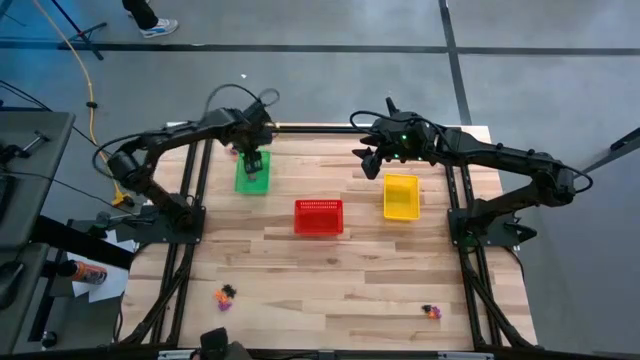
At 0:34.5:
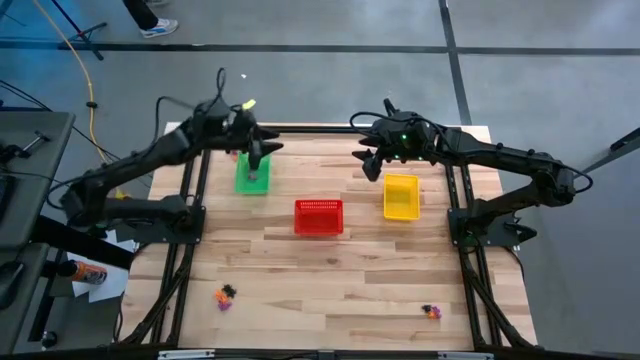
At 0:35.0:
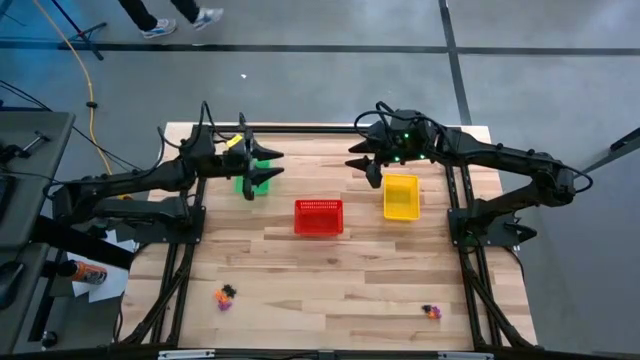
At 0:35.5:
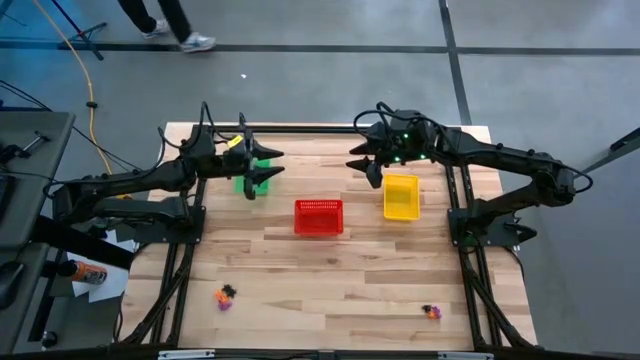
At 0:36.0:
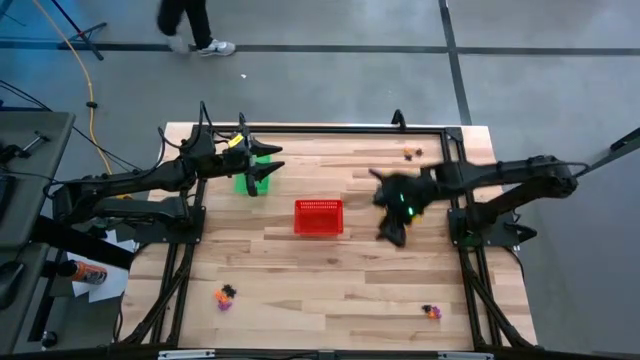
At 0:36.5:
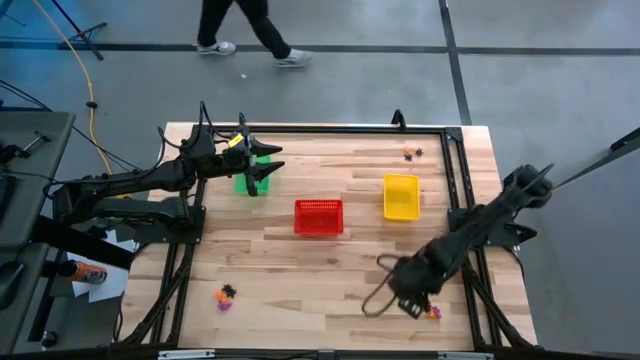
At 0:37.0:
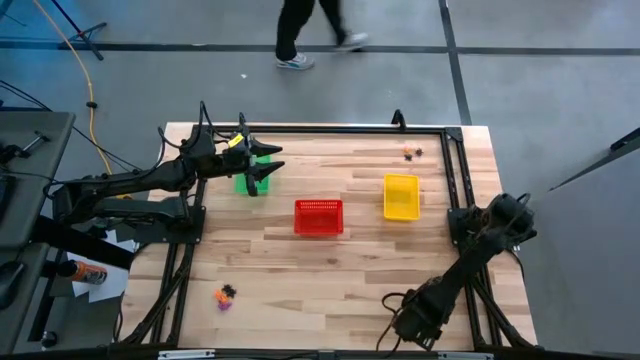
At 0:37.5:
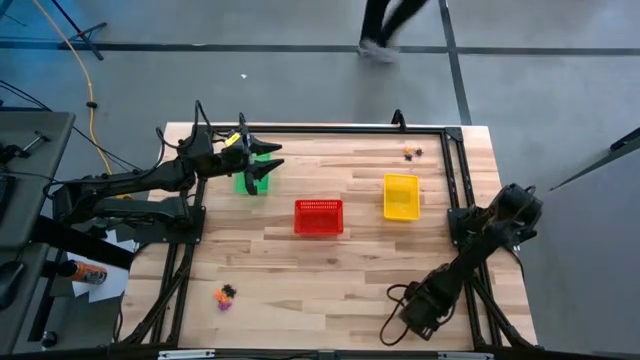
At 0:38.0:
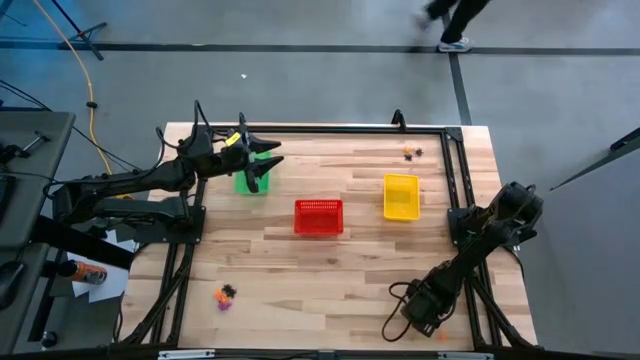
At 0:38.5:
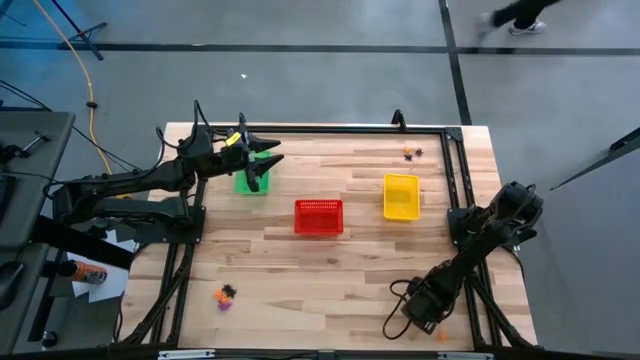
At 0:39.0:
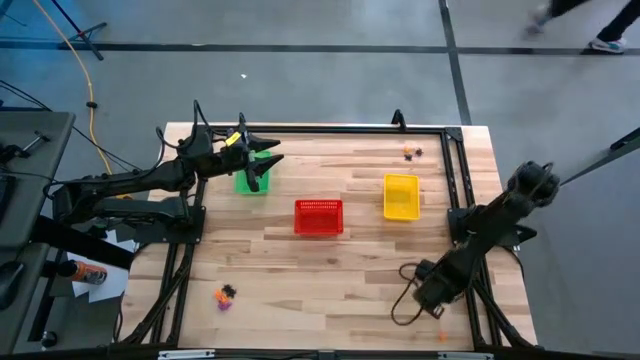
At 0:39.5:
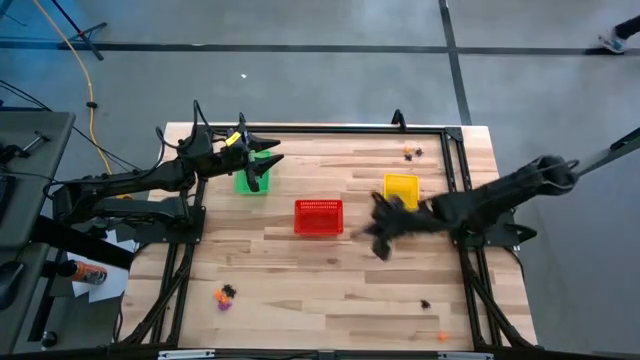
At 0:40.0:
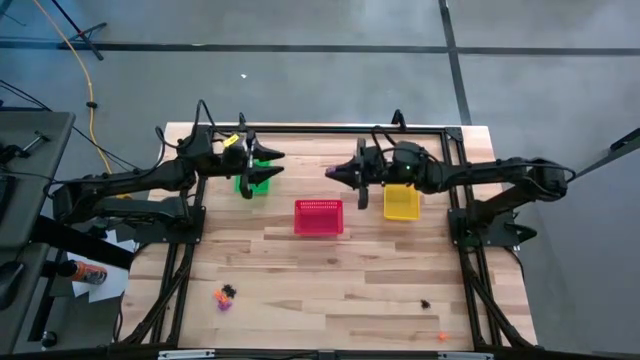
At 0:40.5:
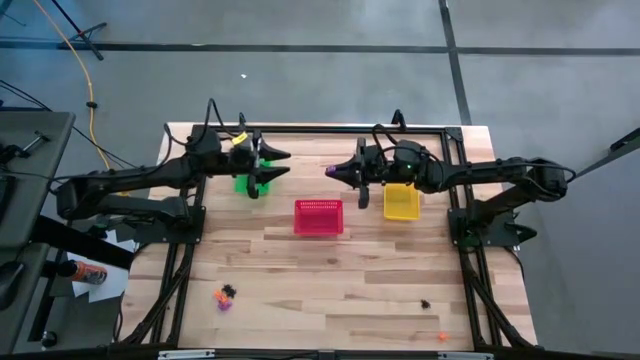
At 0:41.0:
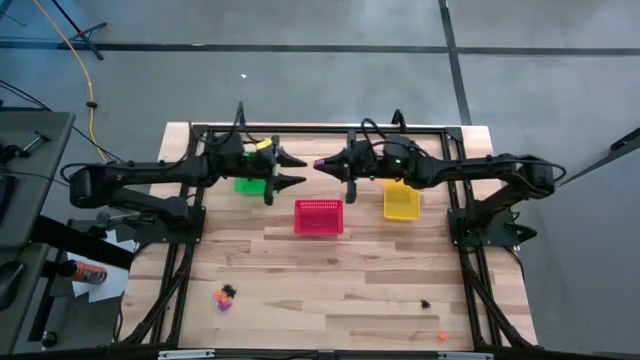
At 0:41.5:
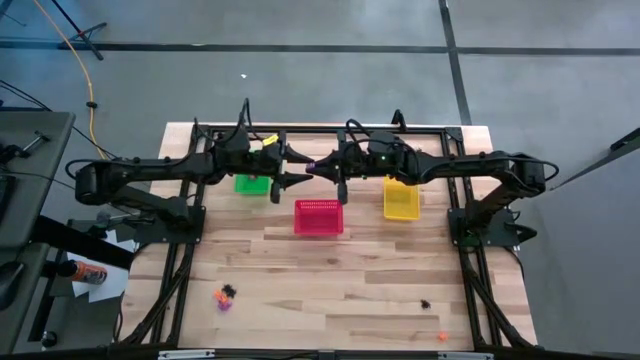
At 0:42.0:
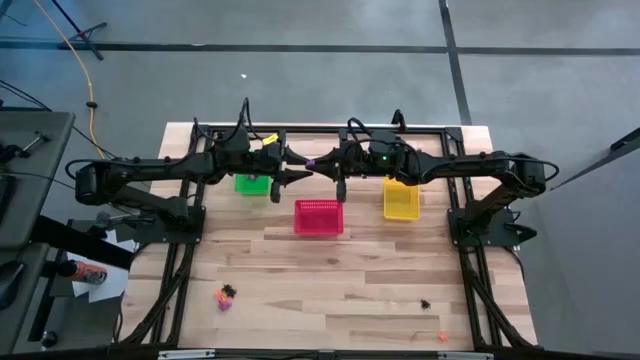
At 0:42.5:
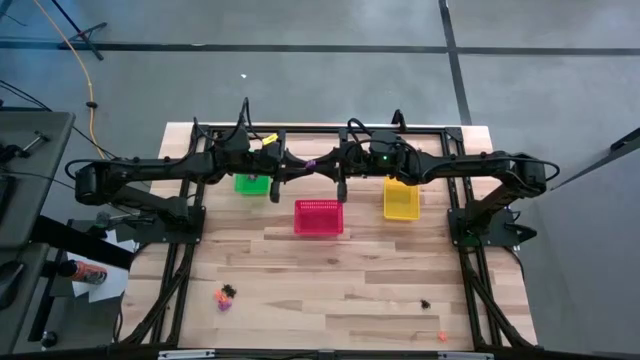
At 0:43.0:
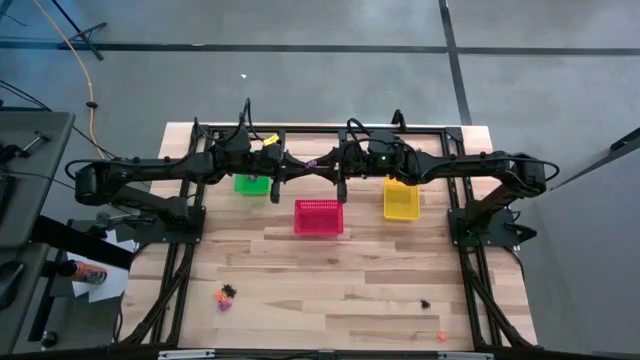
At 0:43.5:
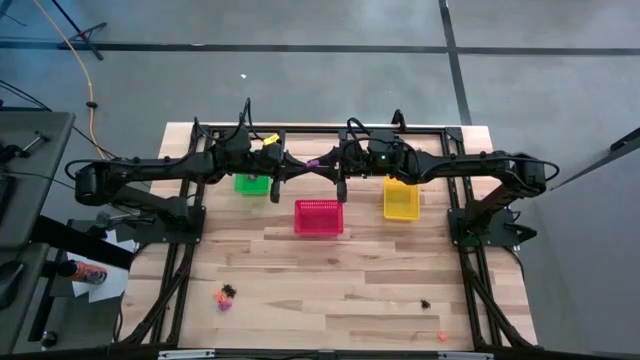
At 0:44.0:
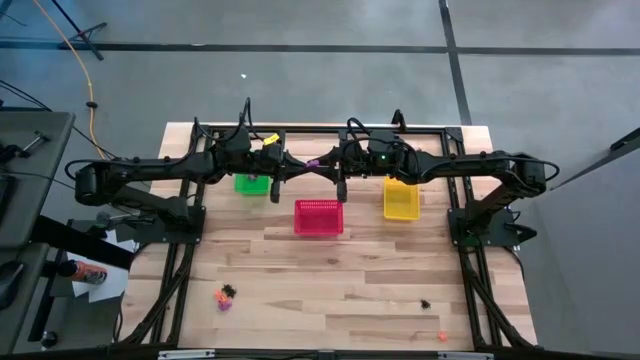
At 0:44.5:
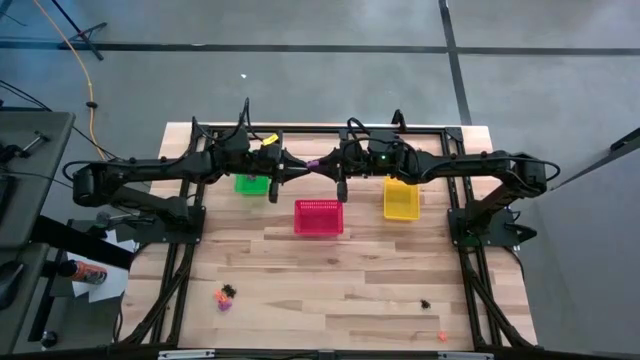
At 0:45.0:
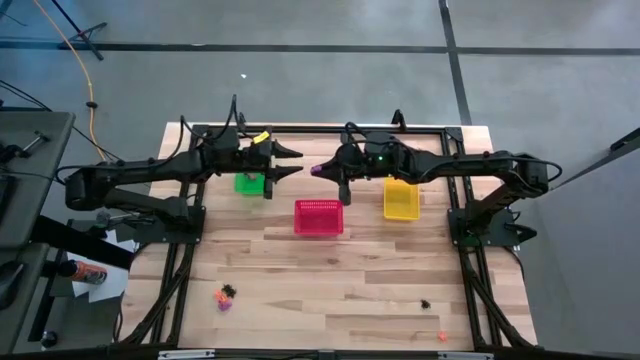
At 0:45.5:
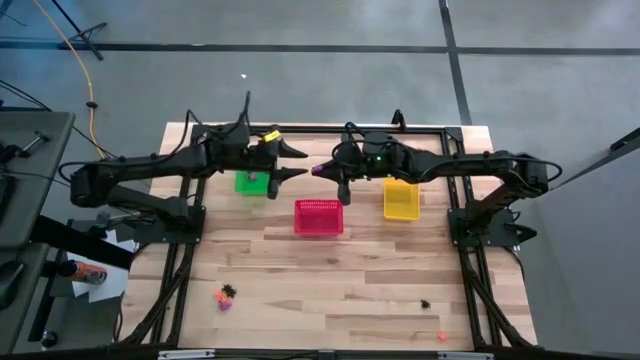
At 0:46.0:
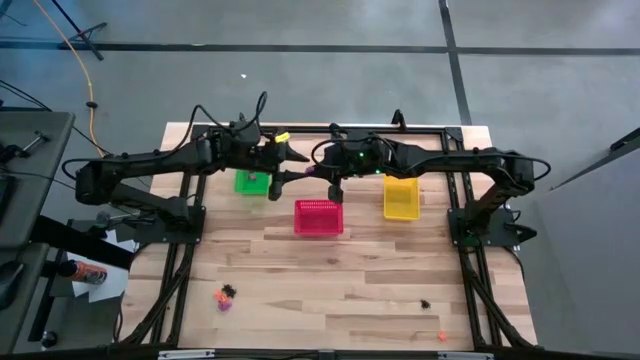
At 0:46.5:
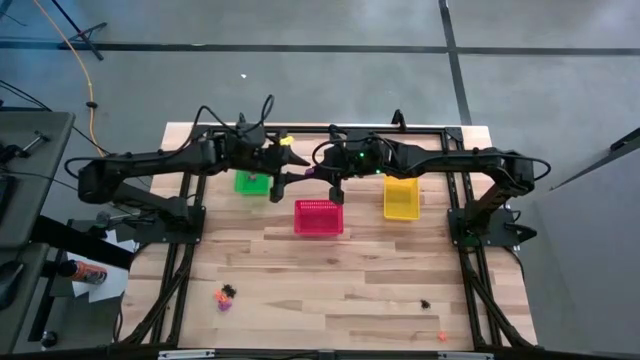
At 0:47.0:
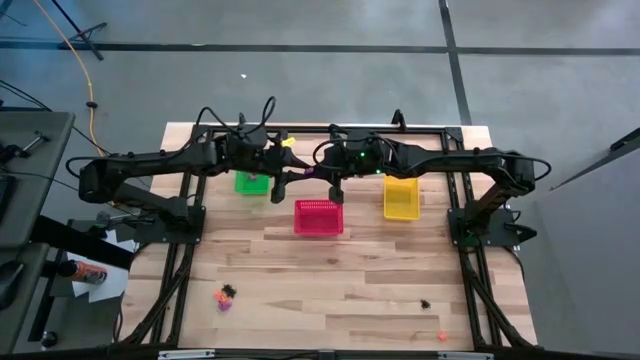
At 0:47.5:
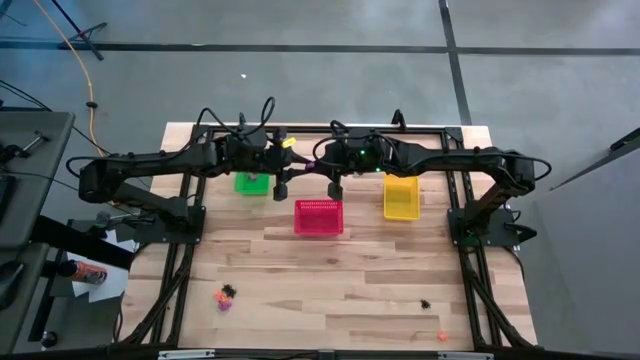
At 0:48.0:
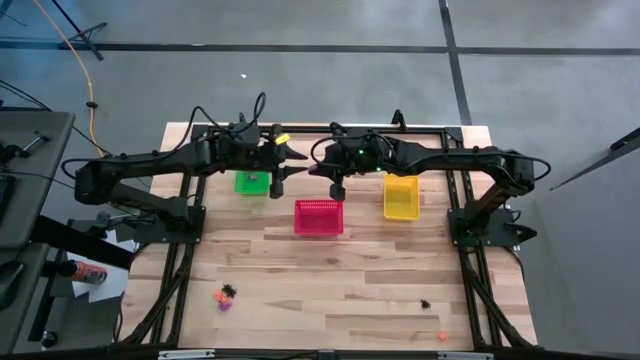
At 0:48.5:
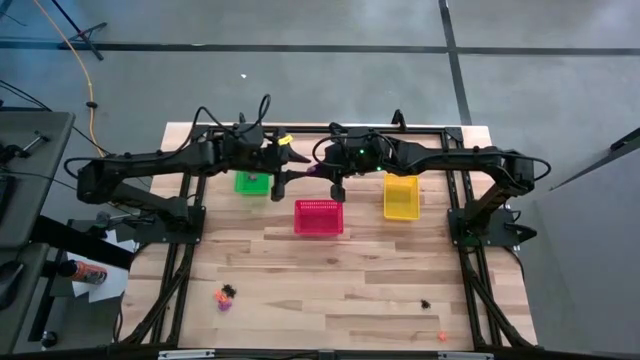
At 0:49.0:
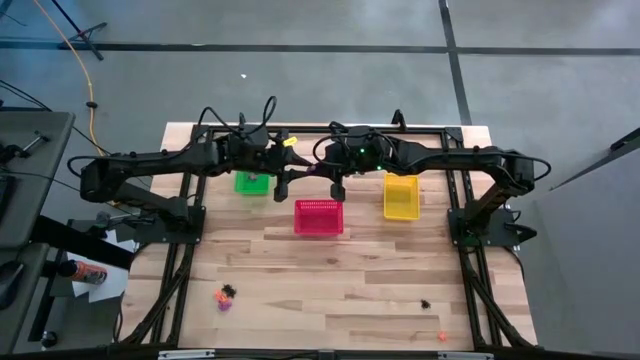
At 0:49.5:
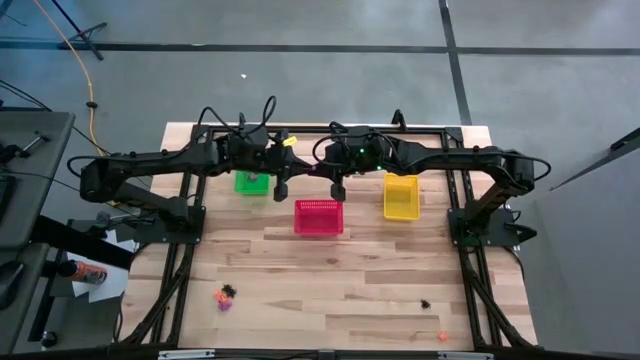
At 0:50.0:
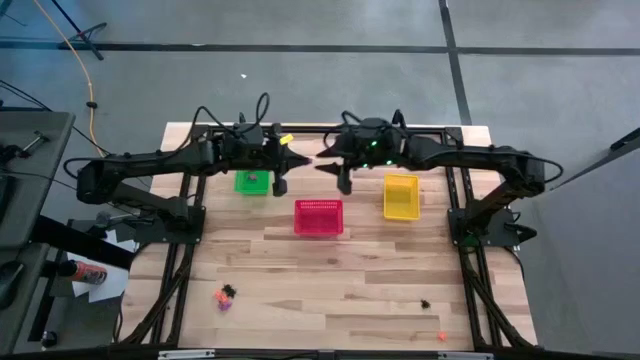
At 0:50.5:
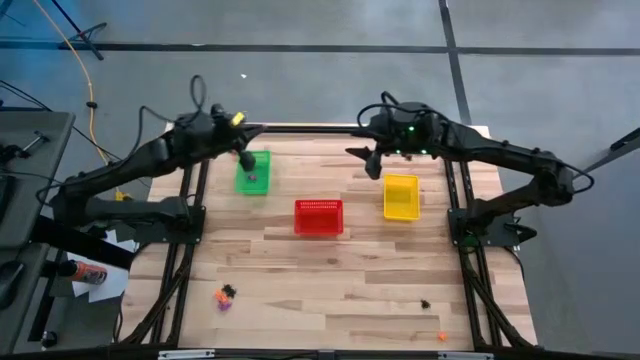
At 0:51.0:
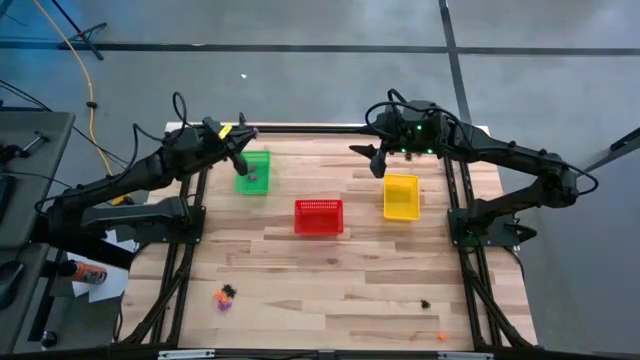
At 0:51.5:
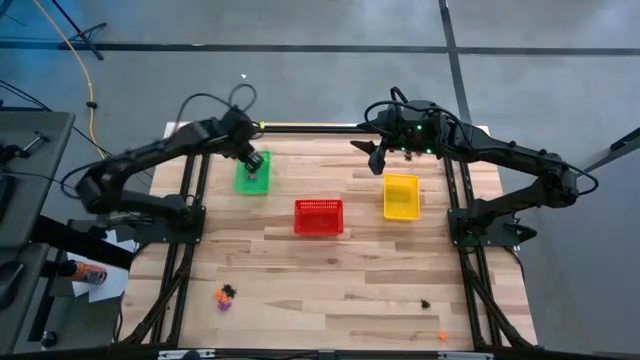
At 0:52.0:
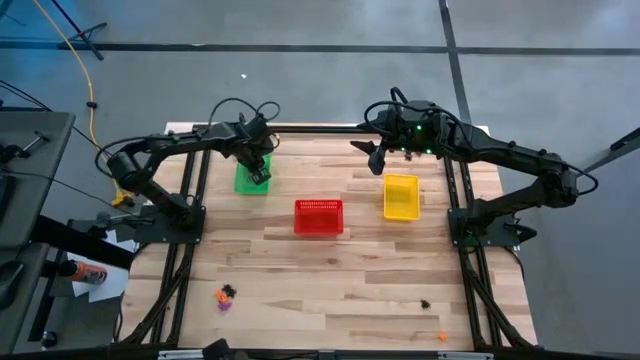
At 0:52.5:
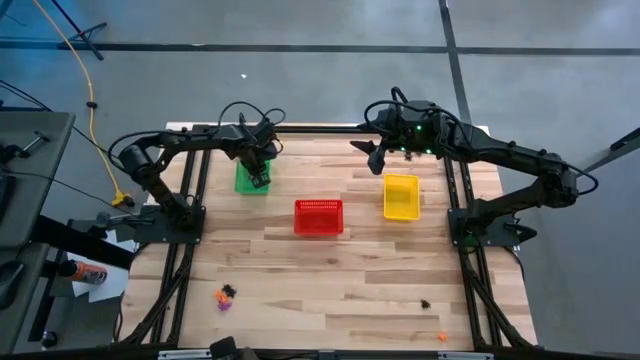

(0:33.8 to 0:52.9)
Task: Sort Halloween decoration
Put the purple skeleton toy into the green bin

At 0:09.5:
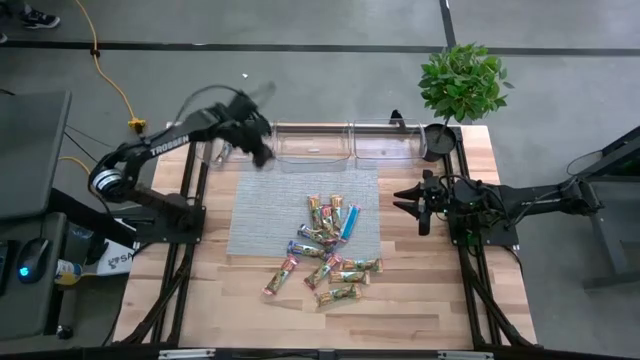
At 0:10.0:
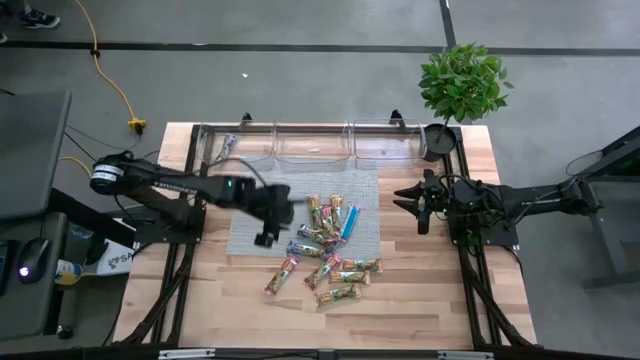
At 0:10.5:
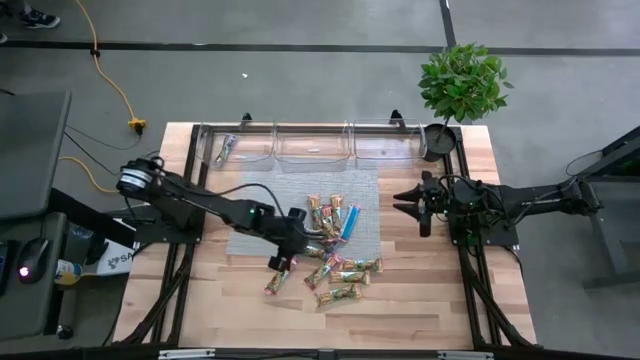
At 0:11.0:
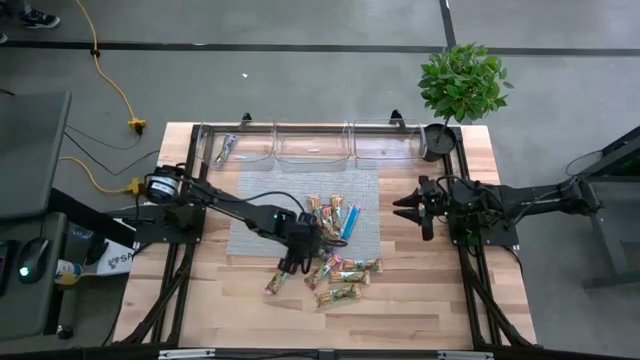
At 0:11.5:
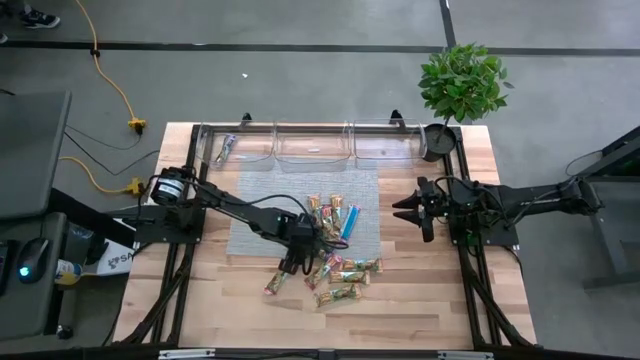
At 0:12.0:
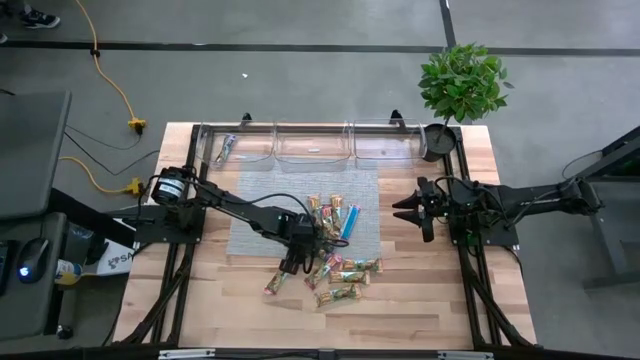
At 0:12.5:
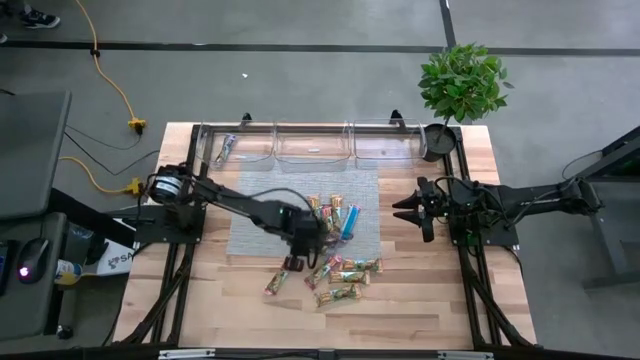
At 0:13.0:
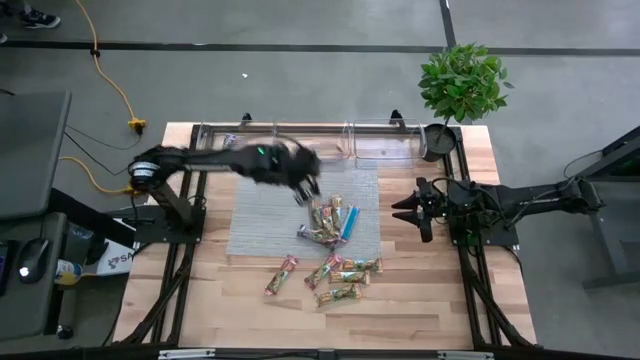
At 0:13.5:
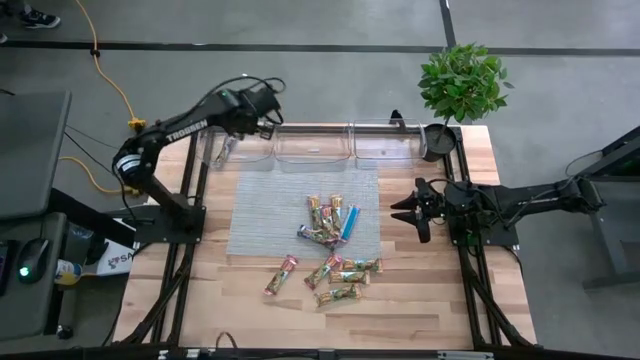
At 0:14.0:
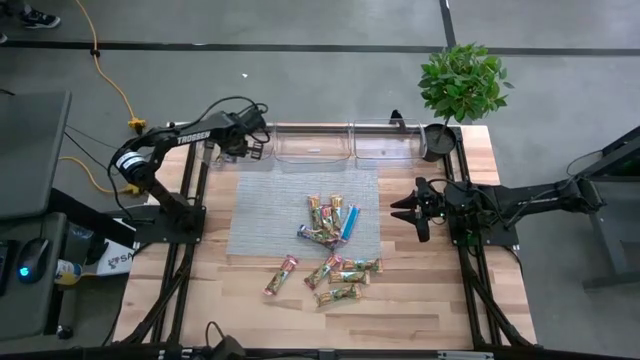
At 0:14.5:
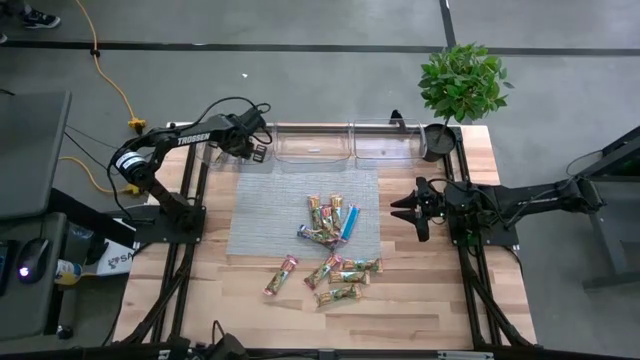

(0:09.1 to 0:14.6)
Task: Pick and place Granola Bars by type
Put the blue granola bar into the left transparent bin
